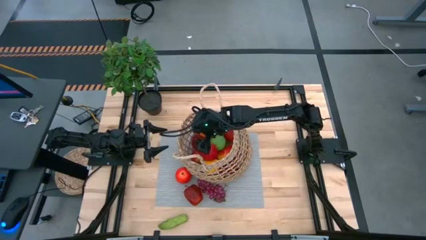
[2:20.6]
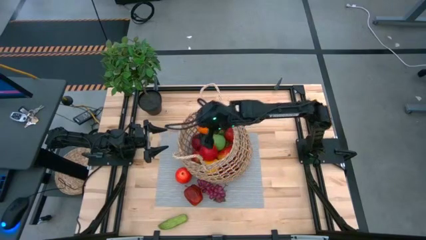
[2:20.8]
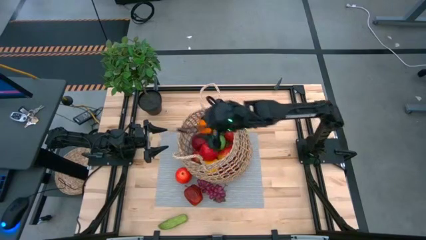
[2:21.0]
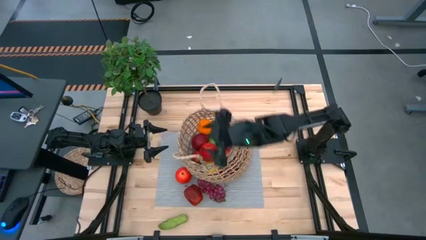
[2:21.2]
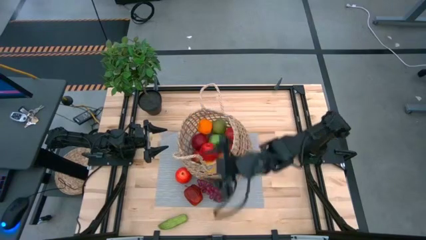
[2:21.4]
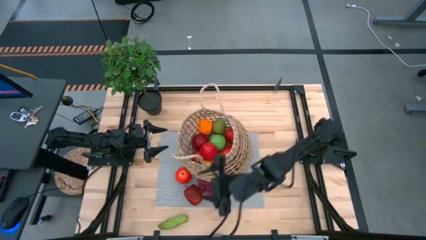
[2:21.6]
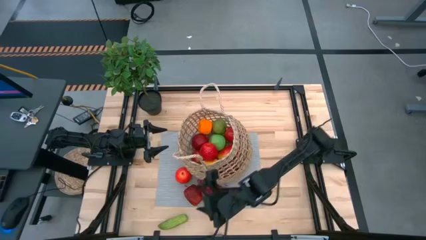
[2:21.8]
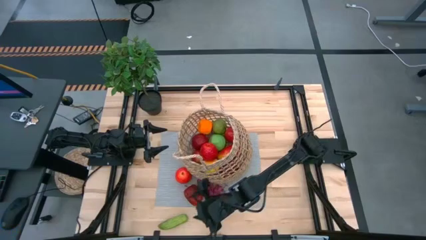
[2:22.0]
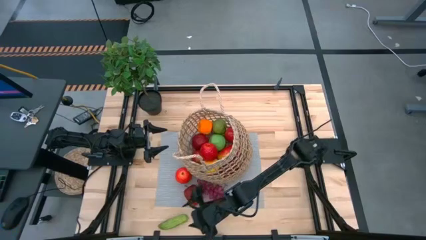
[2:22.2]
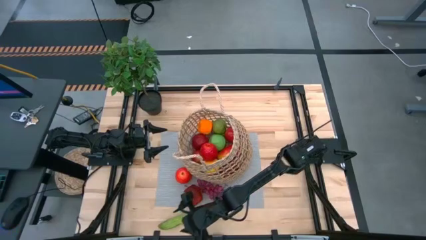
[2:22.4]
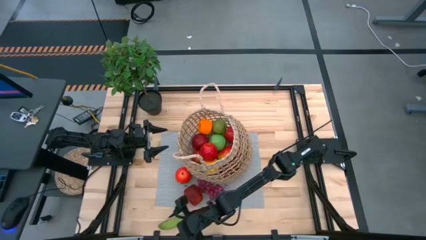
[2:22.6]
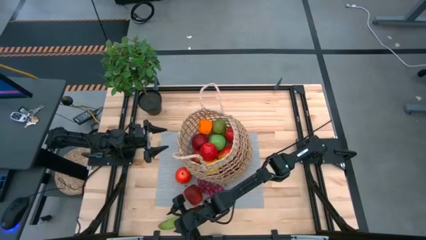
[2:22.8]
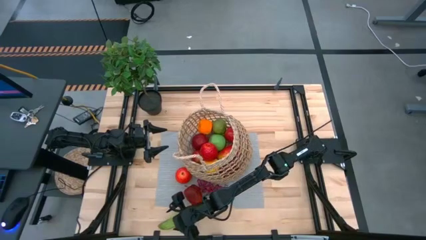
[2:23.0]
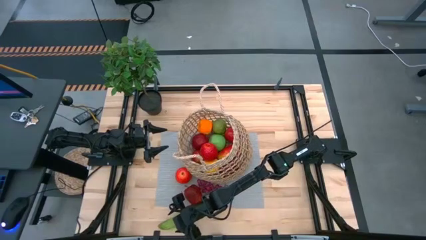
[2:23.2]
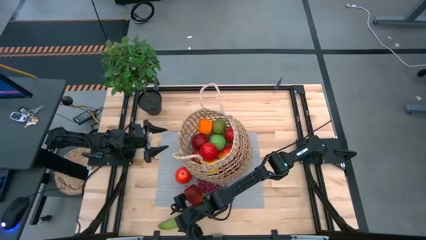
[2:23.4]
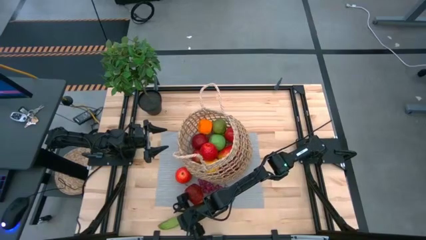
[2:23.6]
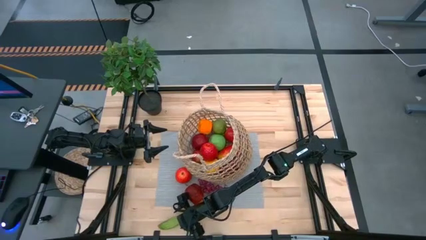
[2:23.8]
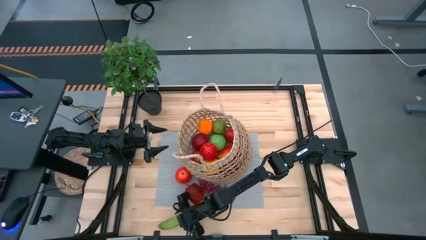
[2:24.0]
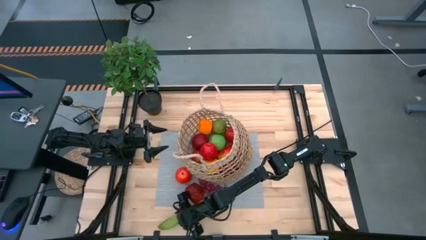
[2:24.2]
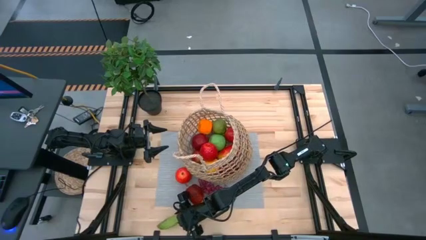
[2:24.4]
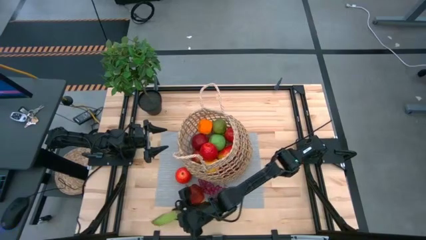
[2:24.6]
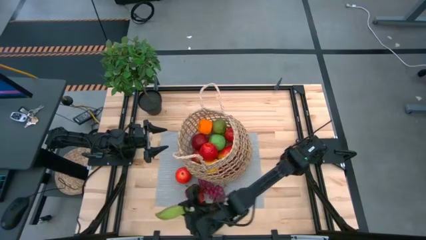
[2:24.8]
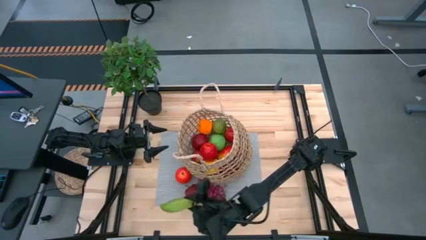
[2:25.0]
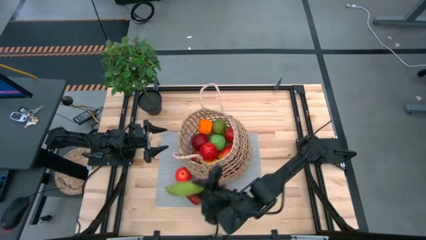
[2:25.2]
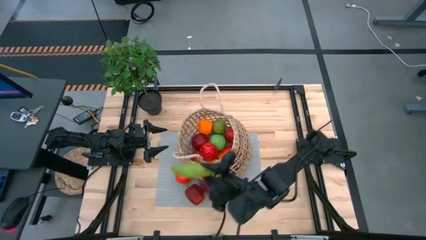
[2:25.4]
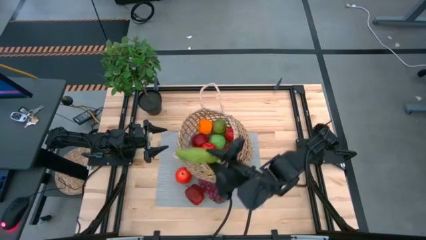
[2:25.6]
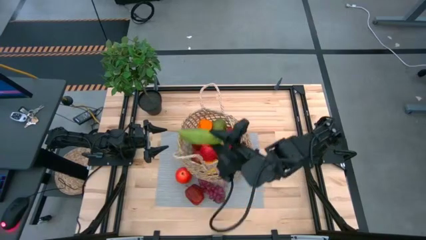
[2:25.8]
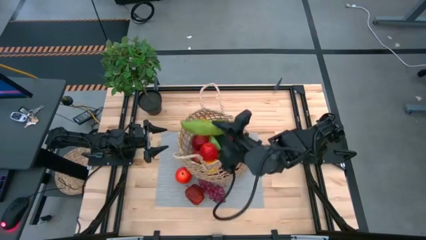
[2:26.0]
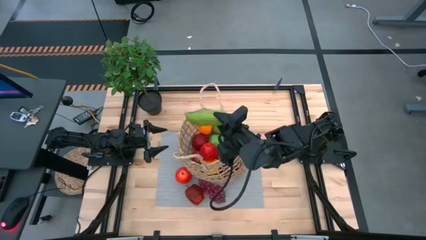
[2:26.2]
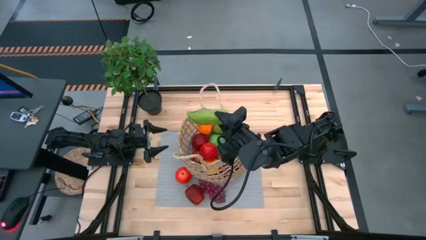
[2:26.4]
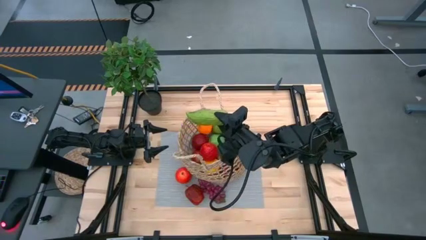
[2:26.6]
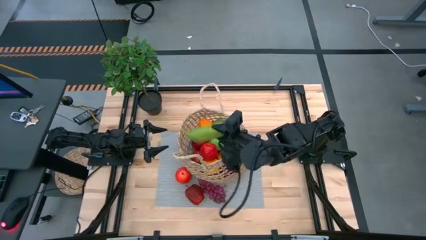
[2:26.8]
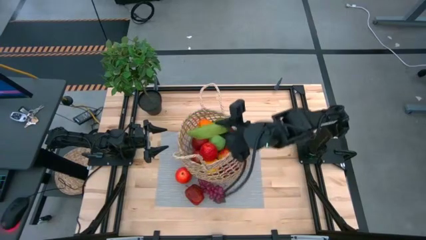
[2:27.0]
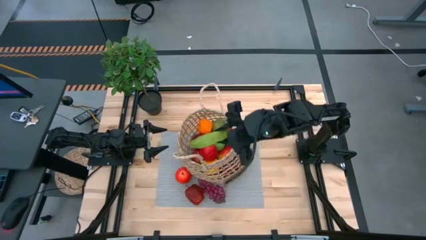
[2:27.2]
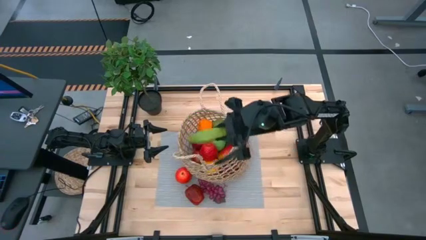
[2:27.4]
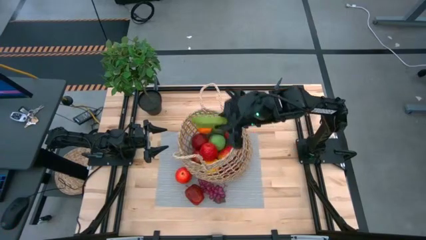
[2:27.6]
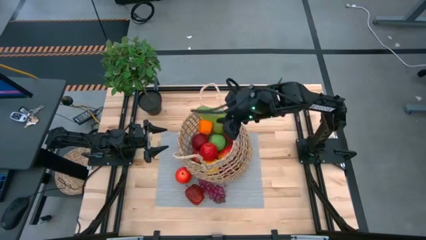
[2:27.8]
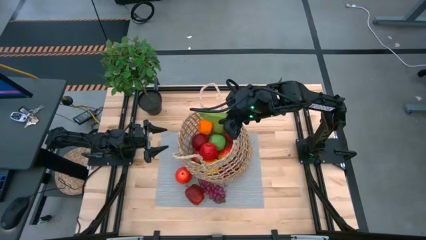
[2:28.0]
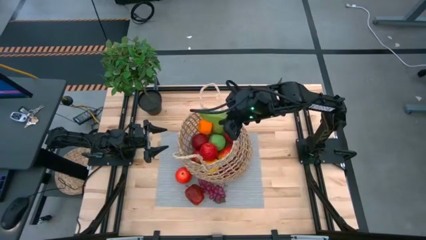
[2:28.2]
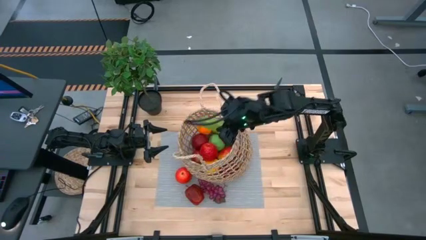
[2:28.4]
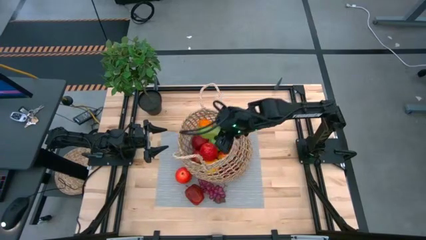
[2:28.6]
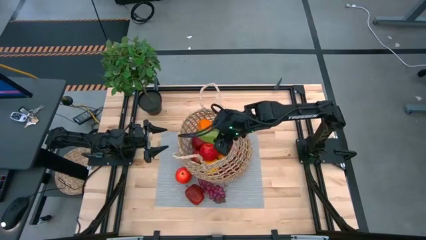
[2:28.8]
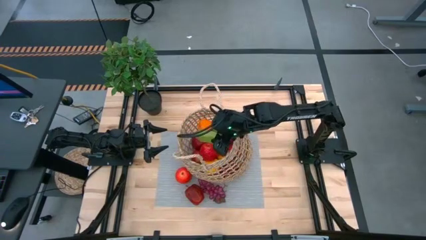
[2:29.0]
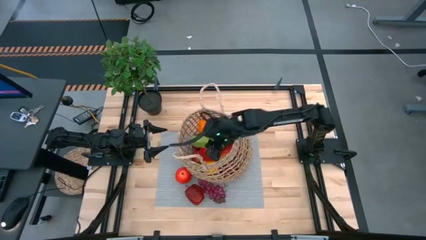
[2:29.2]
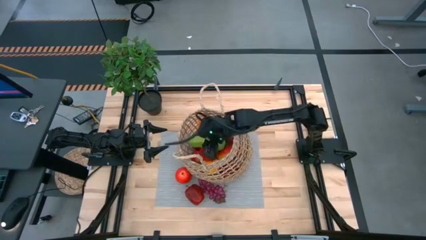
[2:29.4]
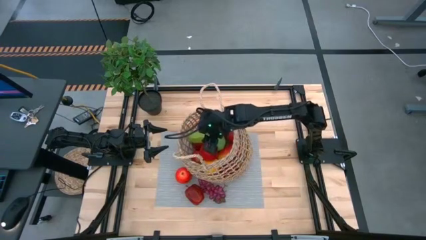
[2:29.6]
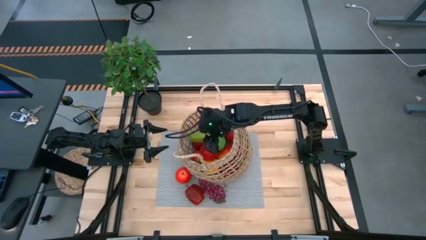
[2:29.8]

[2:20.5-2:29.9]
Task: Build produce basket
Put the cucumber into the basket

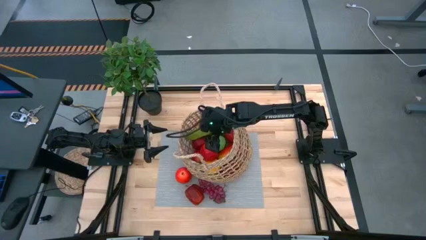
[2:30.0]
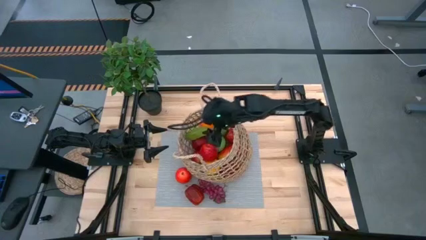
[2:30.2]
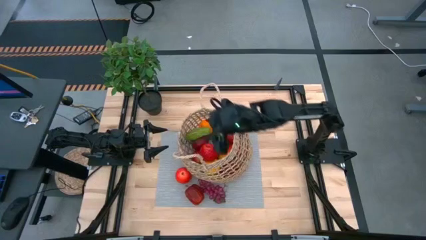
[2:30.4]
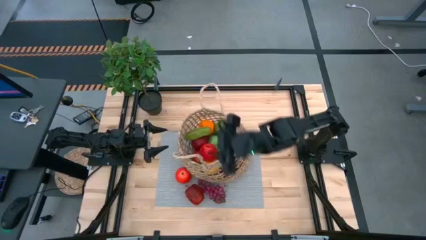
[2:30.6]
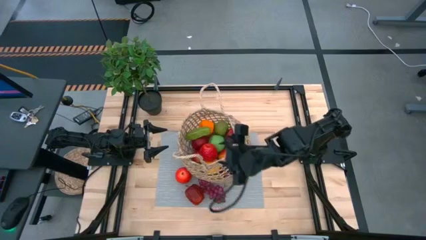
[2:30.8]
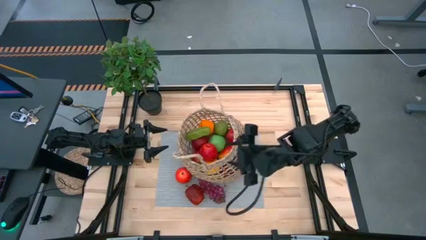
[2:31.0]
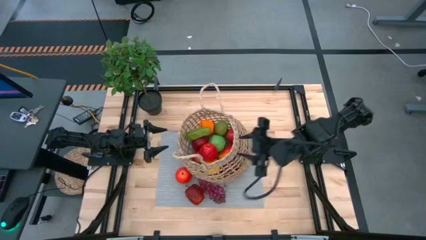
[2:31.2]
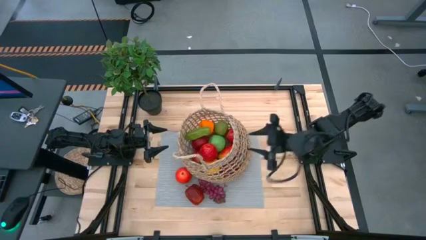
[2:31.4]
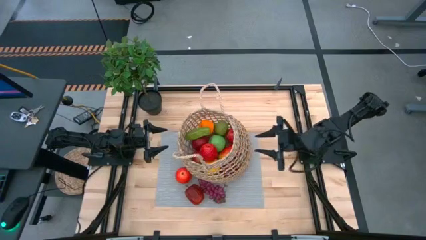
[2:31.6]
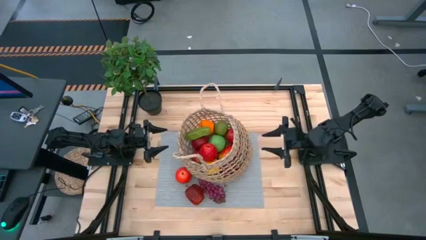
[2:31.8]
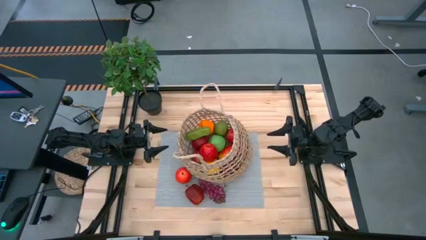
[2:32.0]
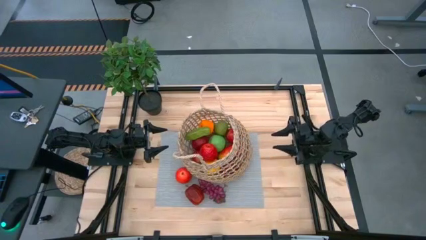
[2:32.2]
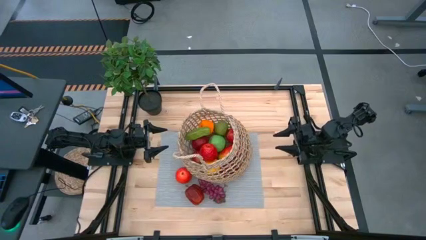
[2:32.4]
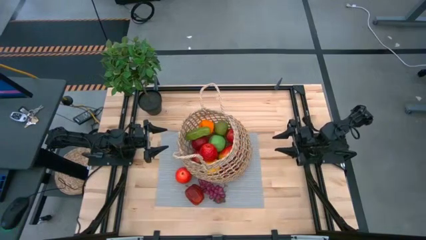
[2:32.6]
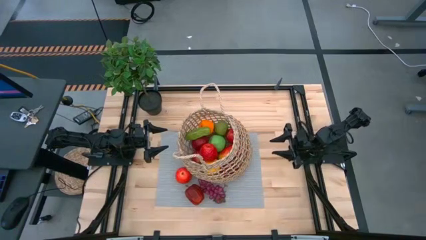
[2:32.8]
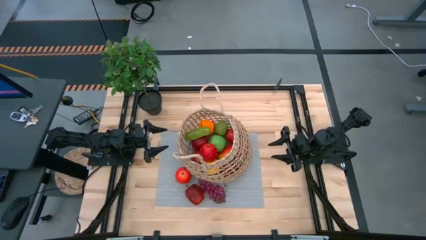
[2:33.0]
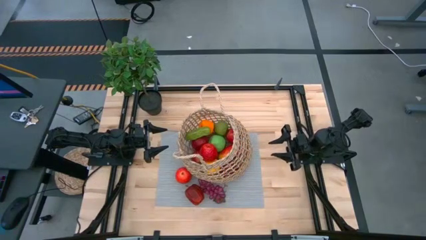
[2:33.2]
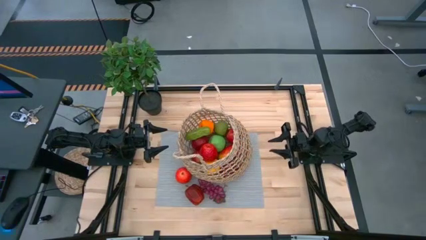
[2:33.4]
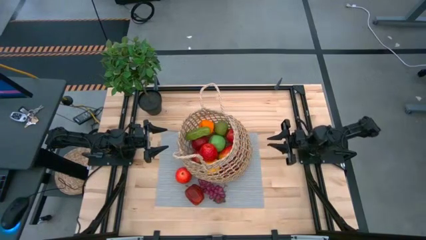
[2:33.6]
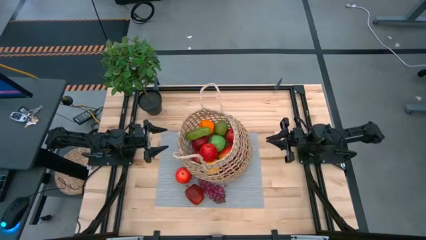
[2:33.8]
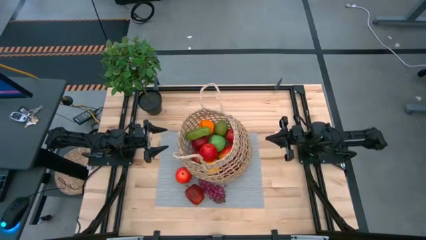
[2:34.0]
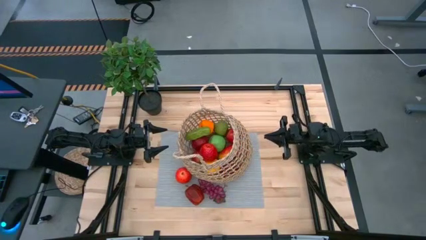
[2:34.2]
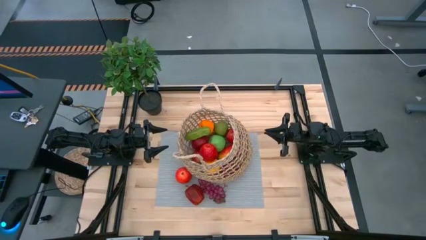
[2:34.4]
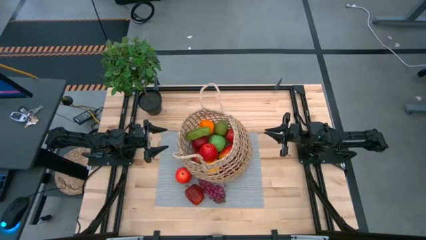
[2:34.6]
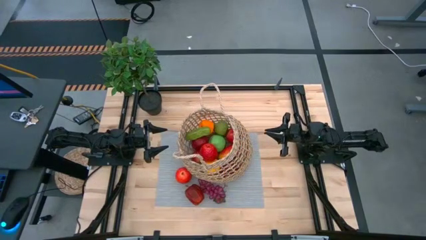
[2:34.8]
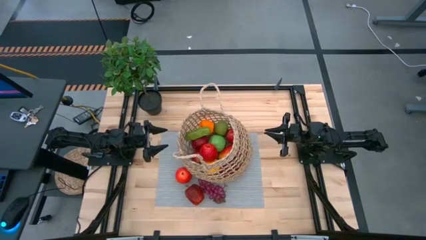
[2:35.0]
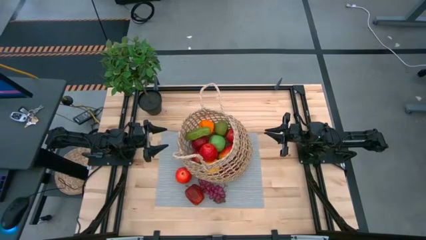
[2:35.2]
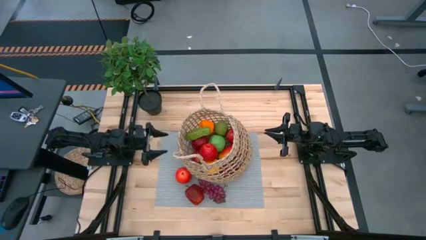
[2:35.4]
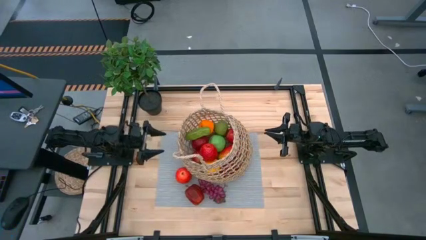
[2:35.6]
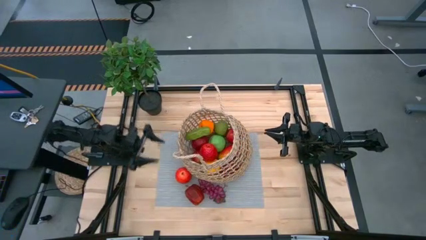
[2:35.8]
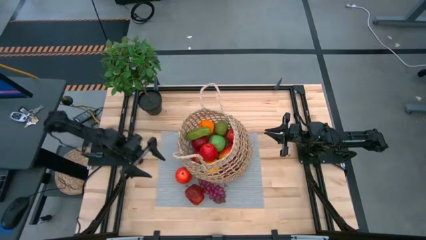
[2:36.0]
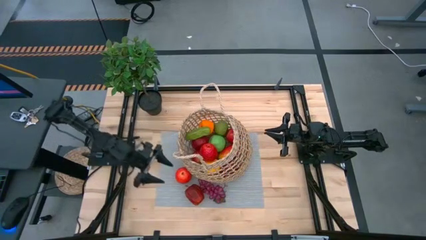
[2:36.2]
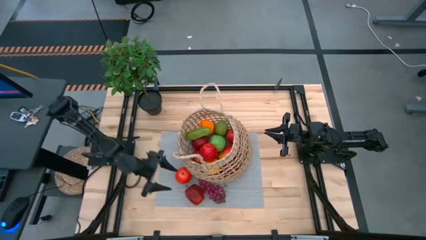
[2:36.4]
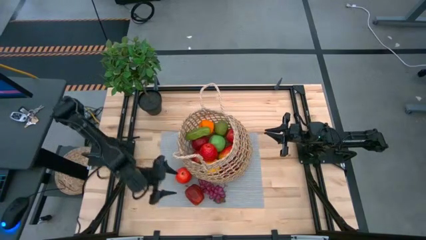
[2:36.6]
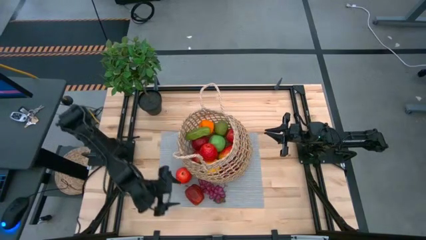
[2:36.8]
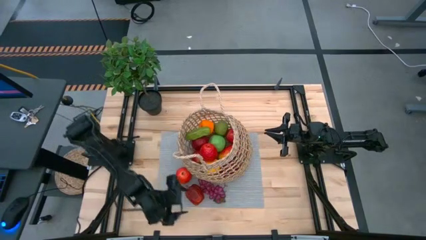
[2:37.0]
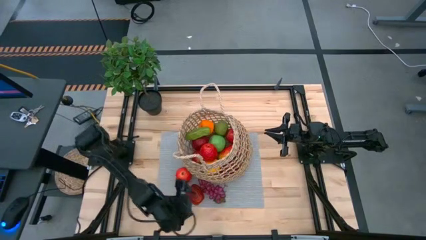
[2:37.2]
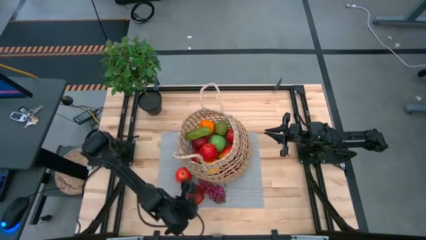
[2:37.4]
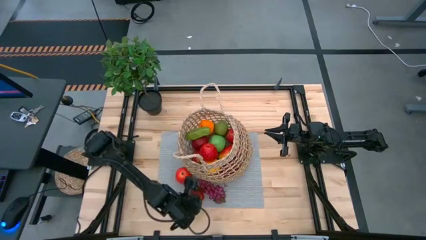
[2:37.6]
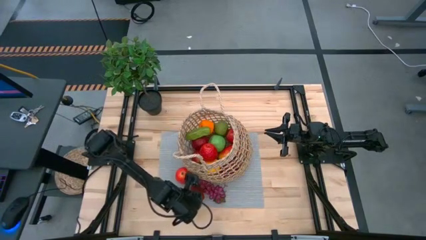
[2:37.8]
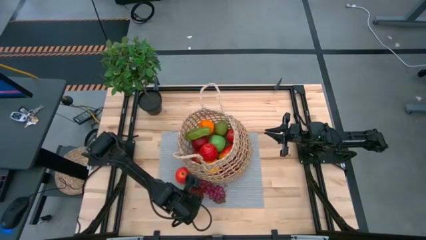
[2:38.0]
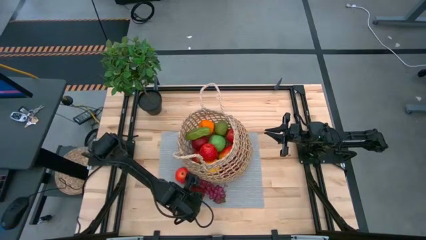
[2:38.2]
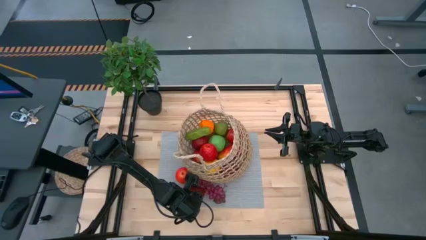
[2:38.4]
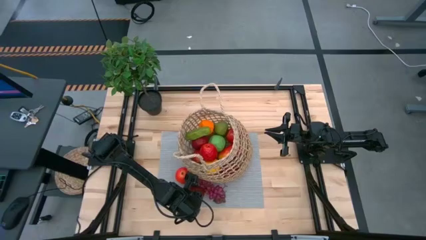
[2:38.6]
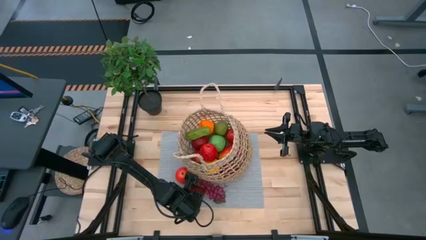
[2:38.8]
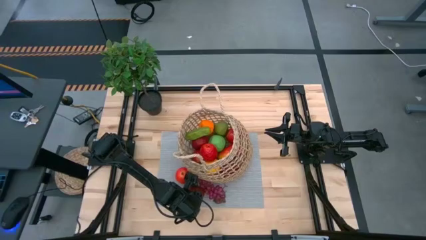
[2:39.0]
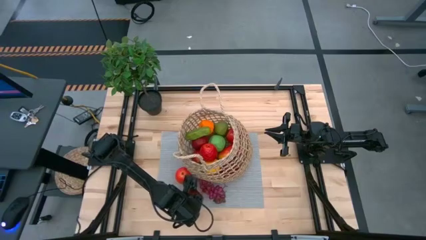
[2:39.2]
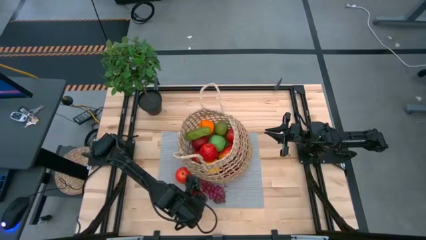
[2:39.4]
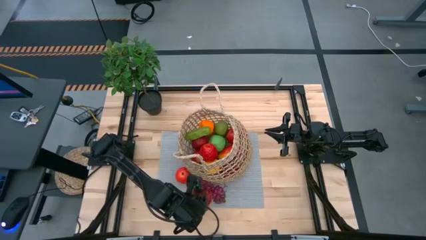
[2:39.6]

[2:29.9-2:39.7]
Put the red apple into the basket
